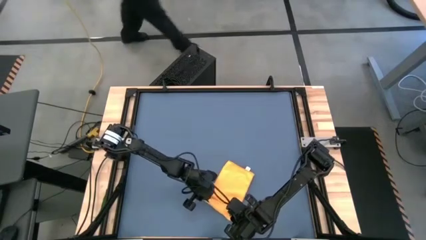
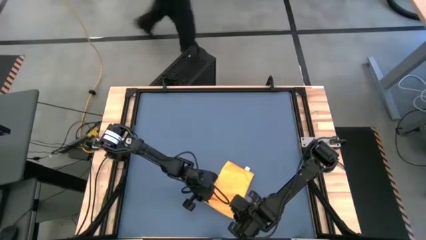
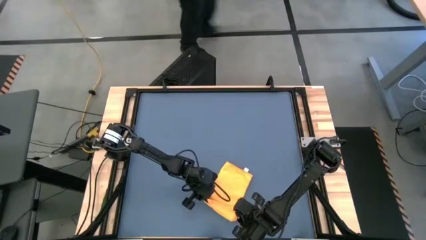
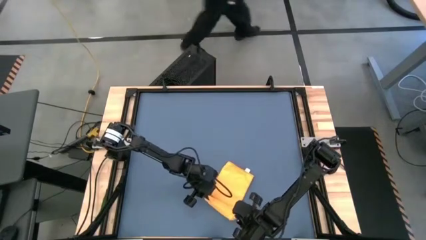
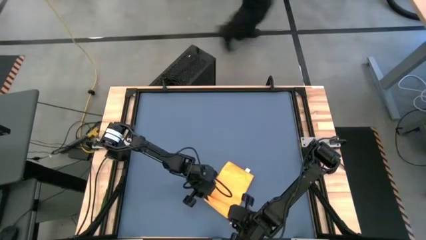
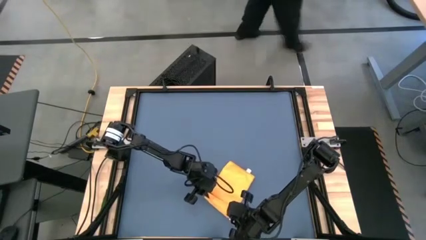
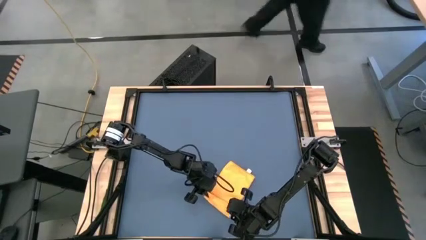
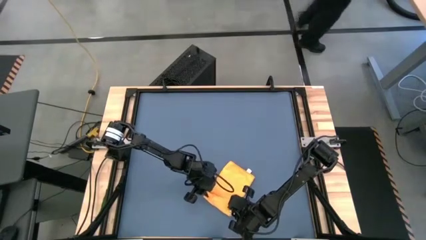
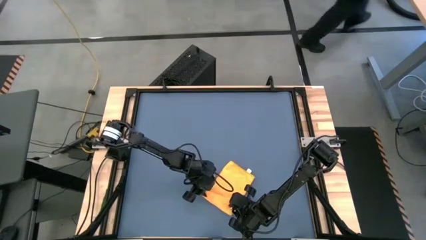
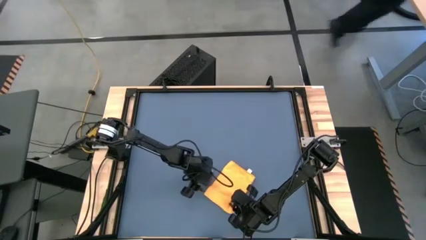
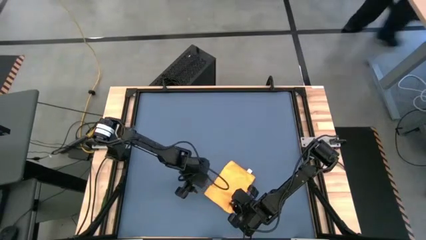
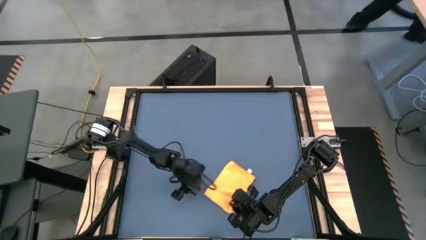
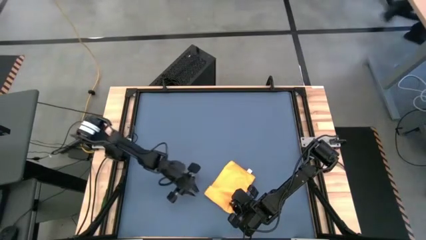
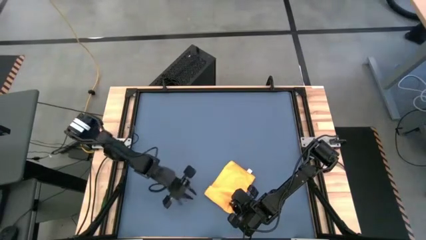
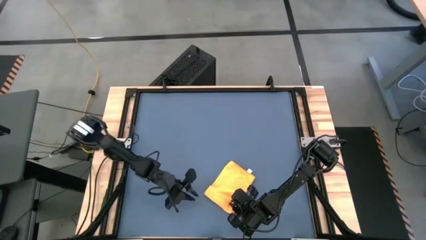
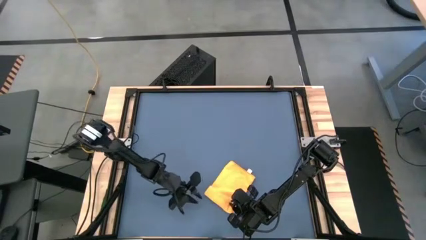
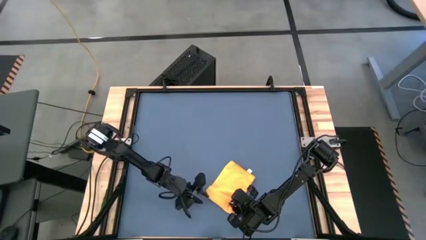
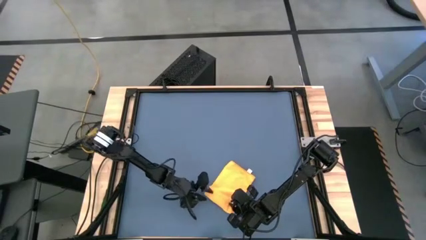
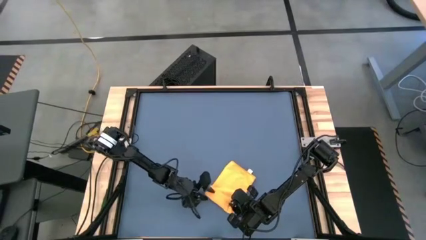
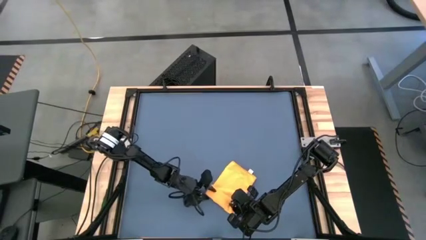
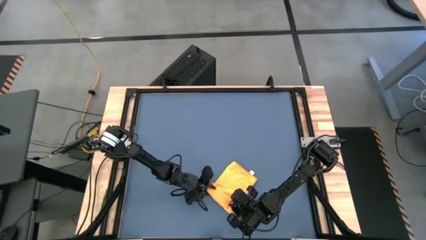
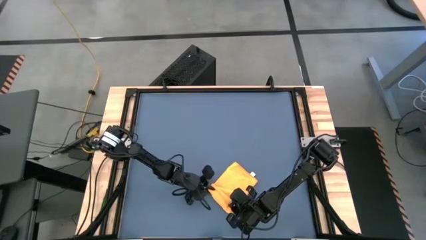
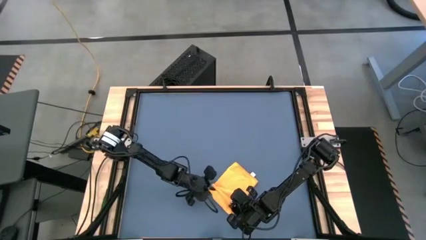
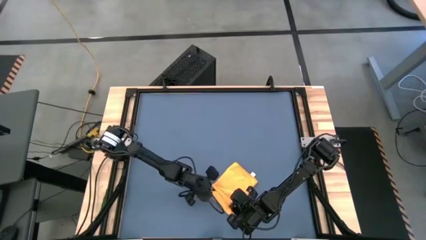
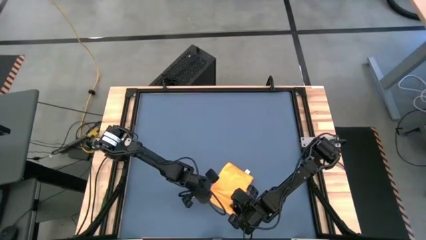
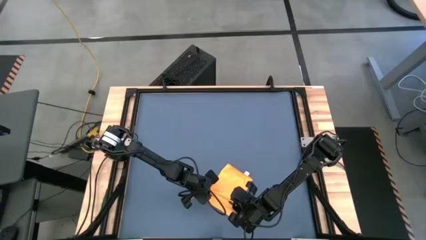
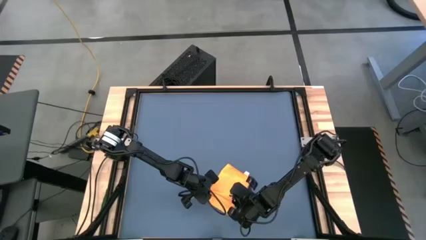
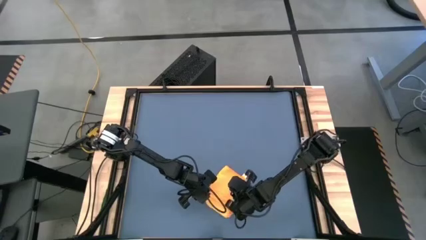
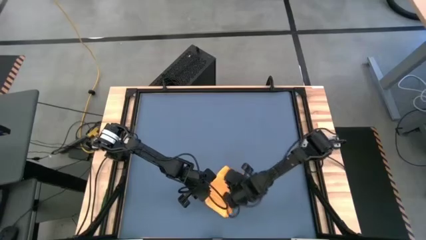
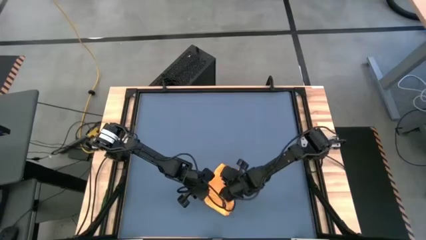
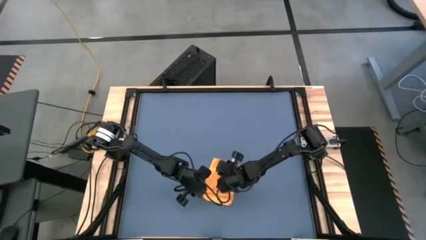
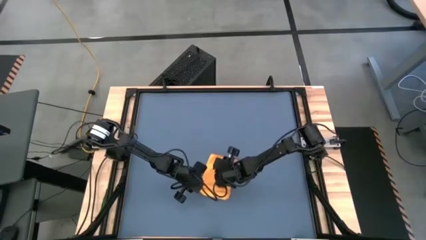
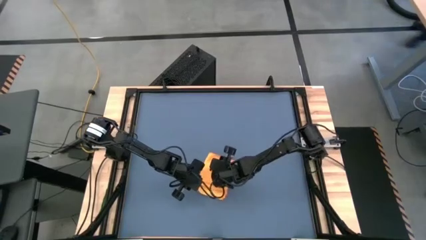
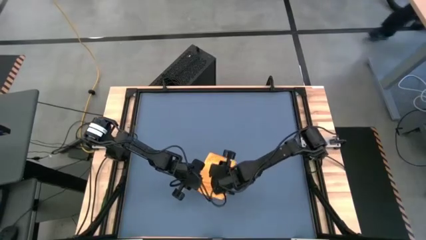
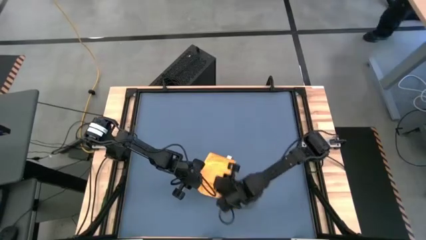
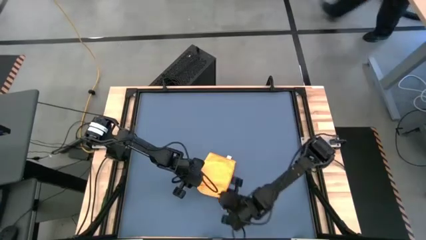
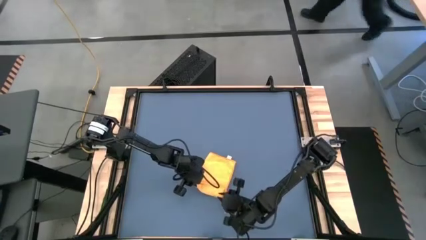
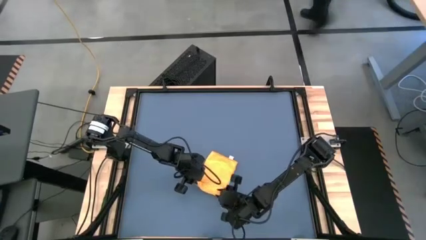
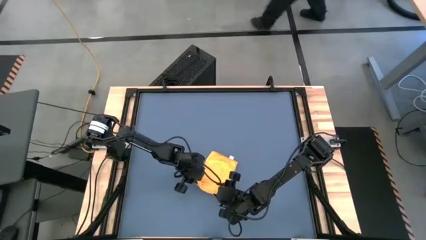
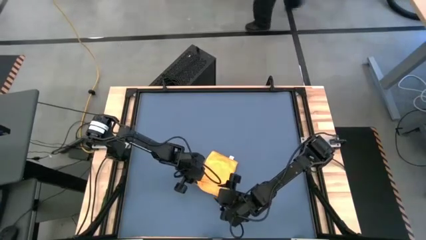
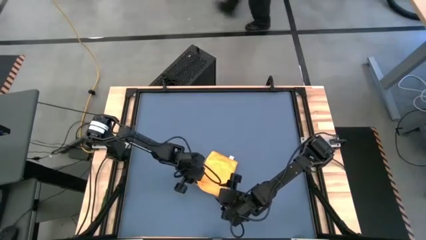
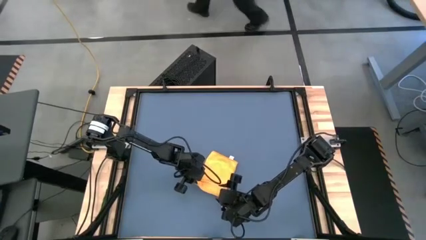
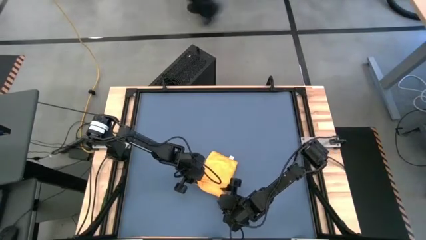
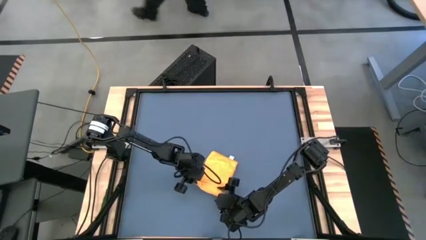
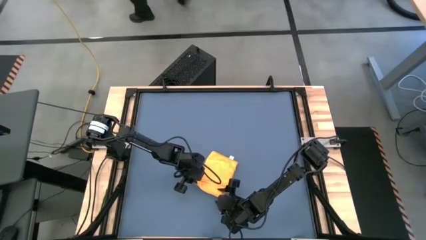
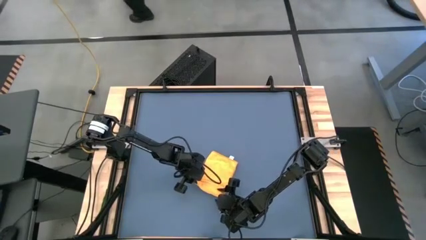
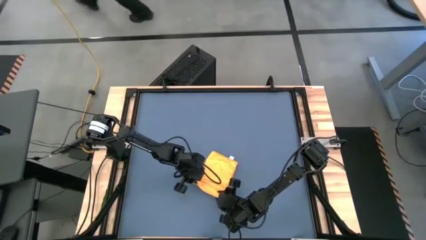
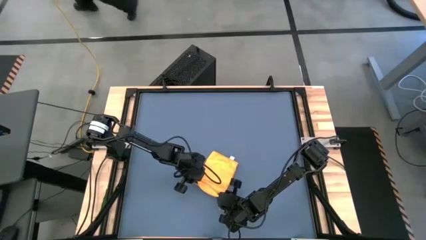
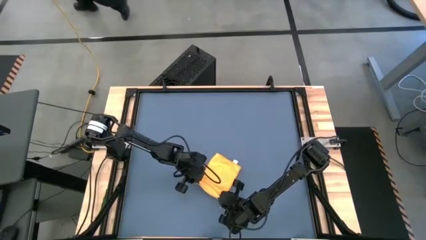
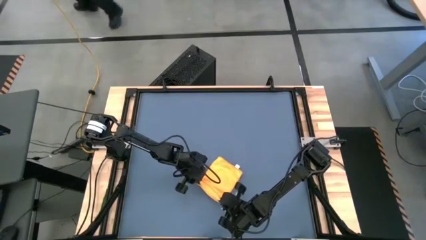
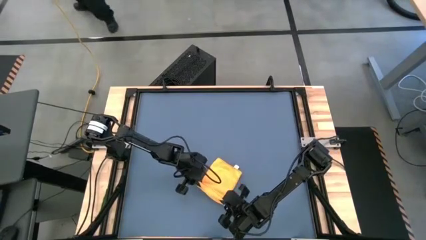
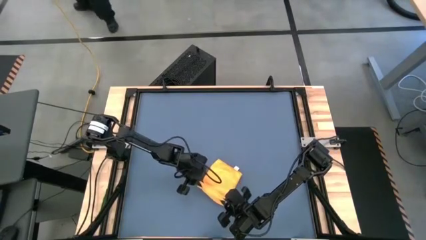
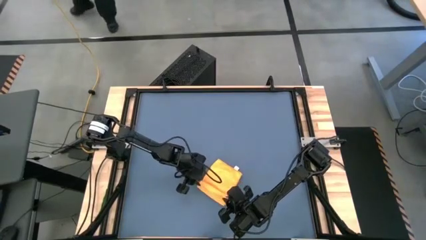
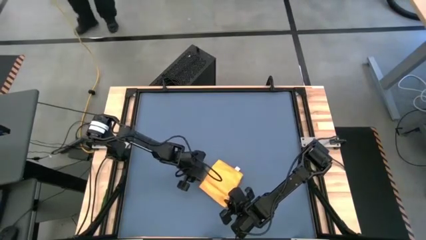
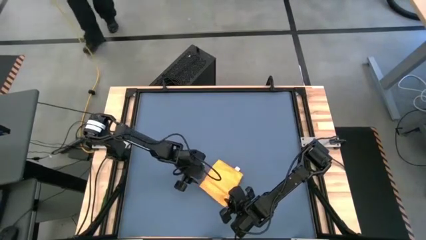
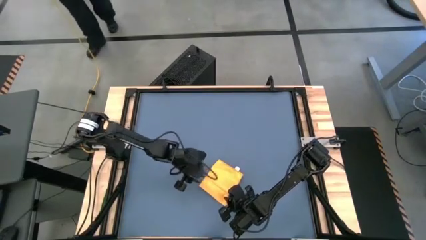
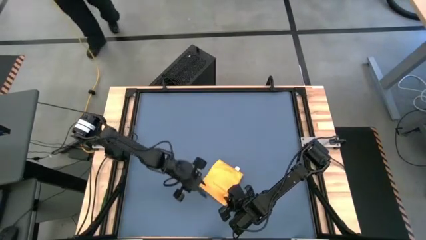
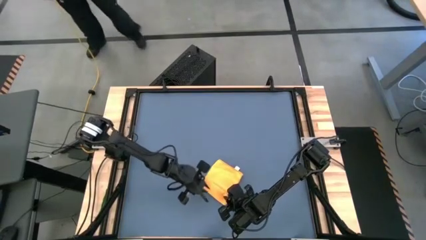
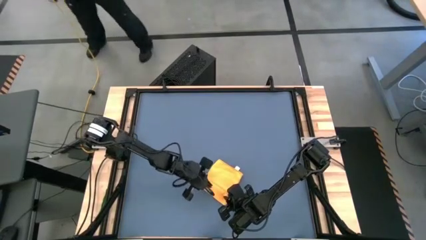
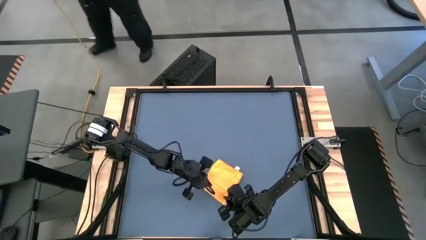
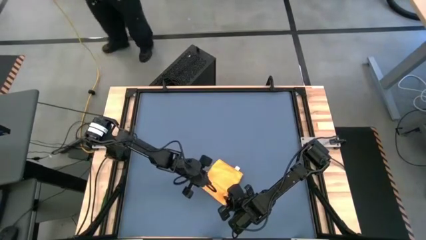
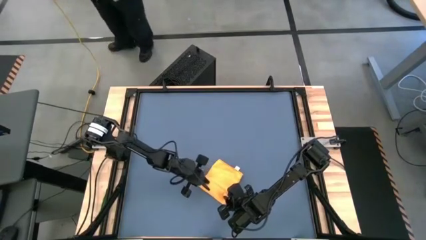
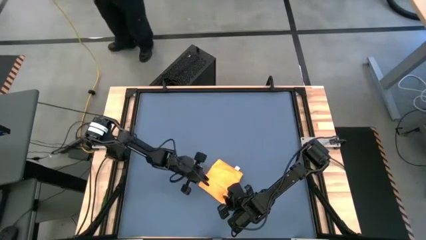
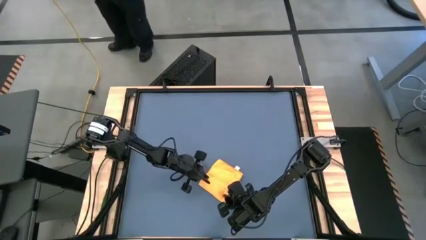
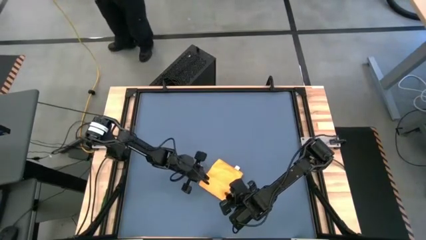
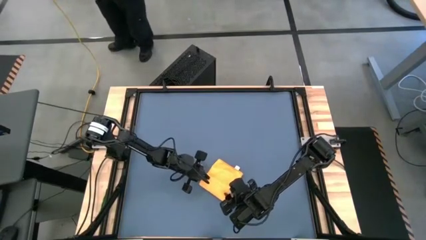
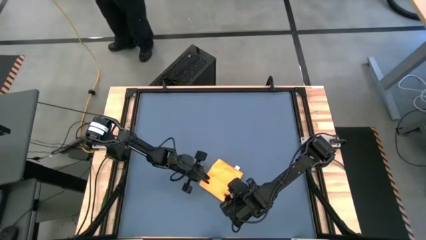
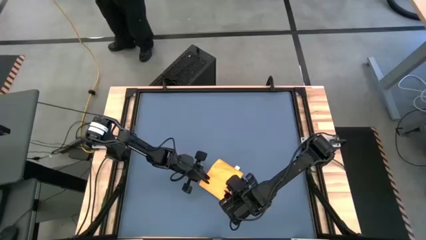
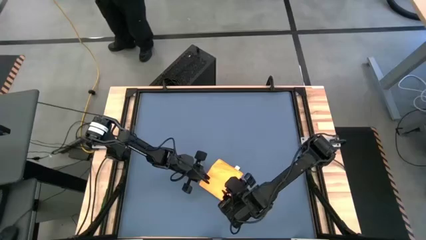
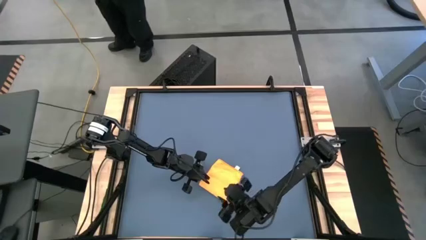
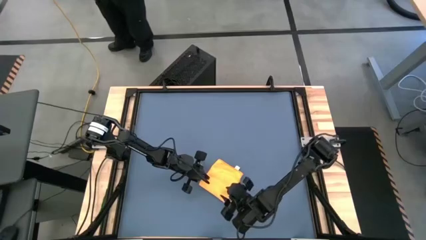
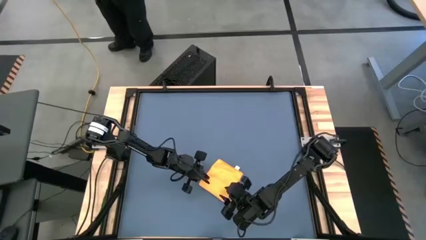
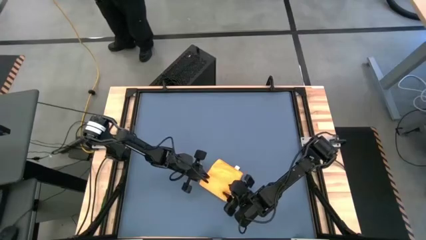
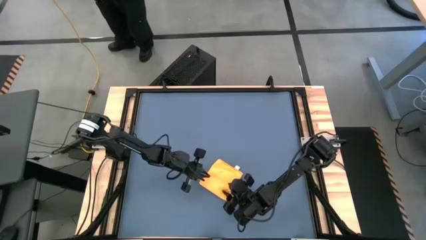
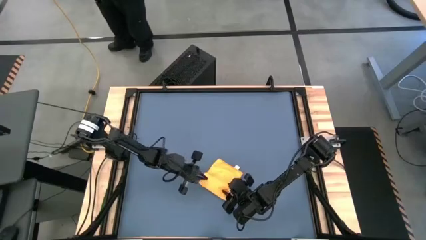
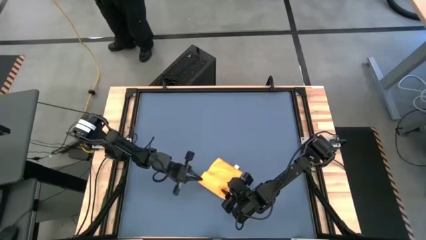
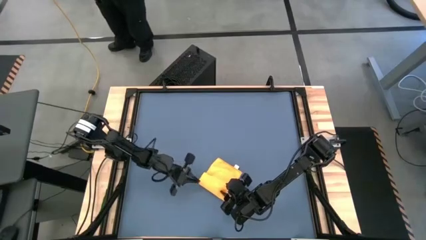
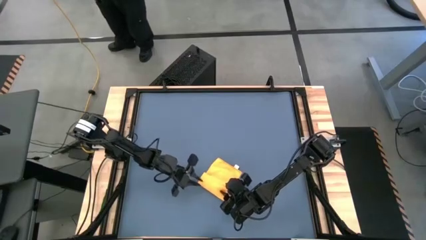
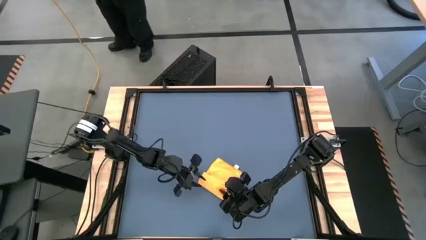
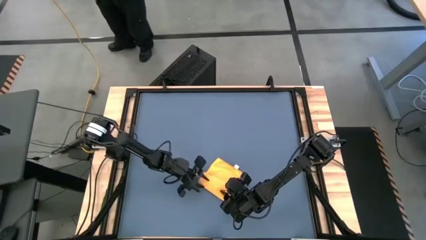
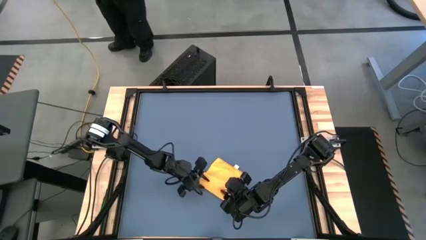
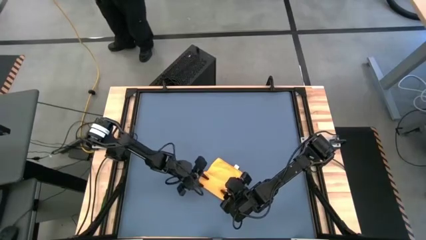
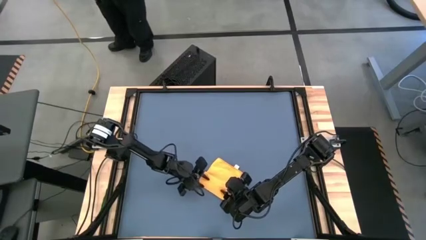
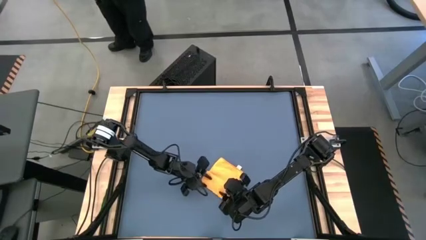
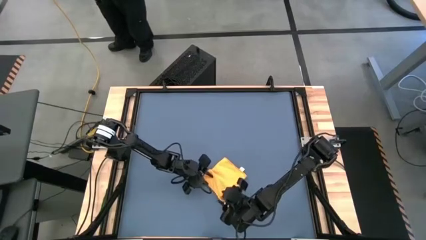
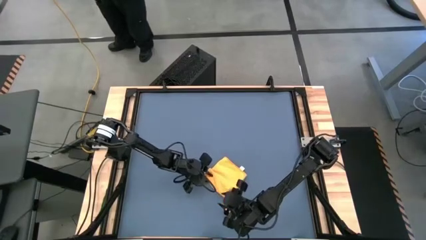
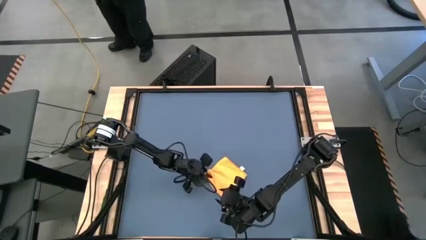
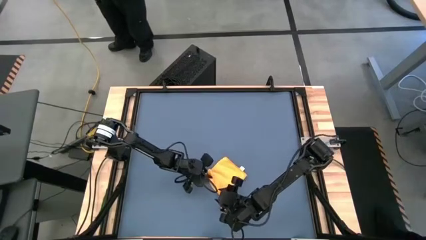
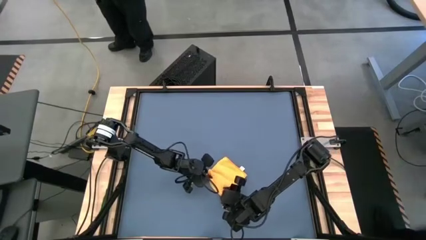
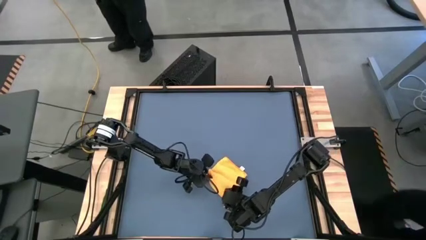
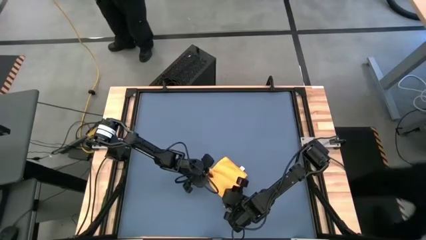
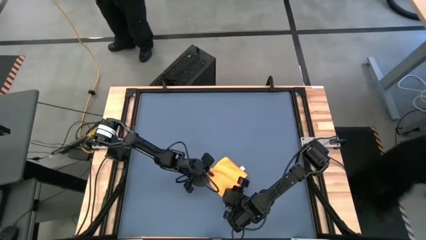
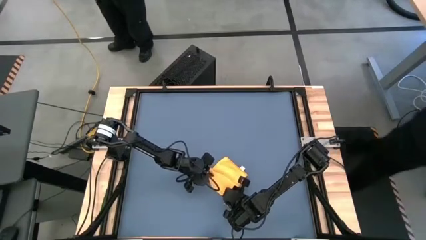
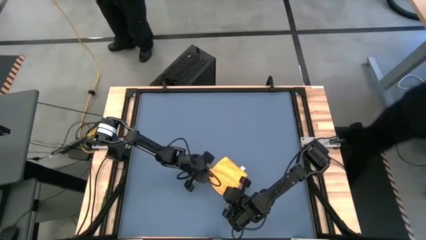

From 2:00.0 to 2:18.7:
Task: Roll towel
Roll the yellow microfiber cloth
